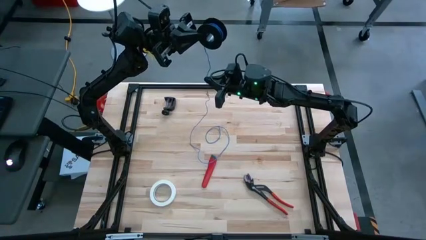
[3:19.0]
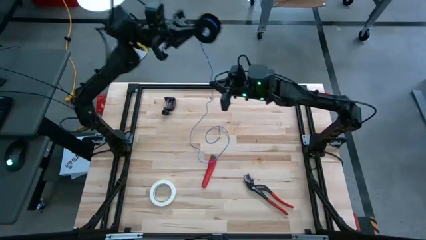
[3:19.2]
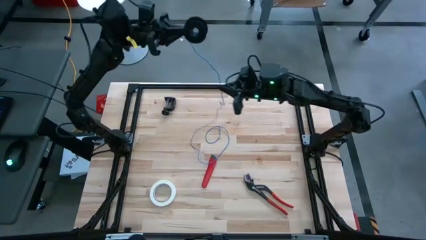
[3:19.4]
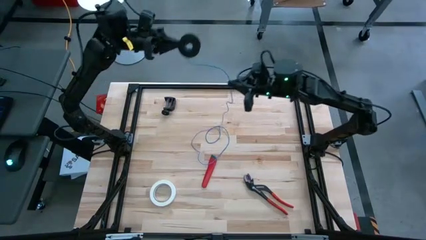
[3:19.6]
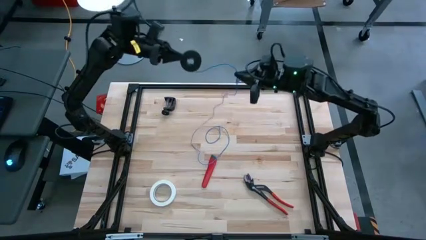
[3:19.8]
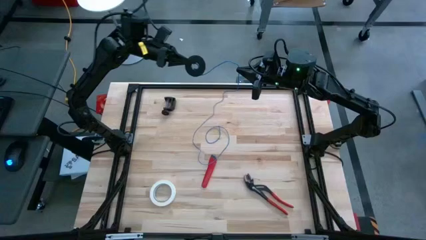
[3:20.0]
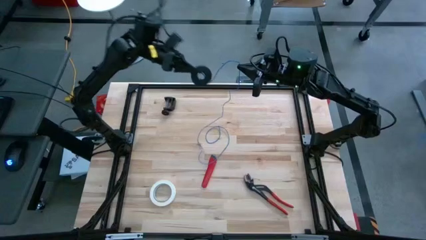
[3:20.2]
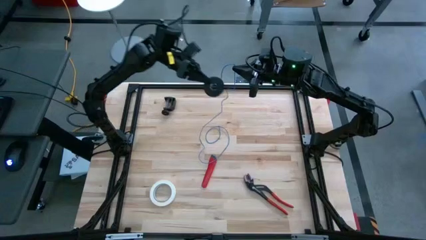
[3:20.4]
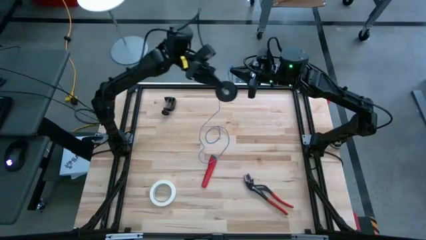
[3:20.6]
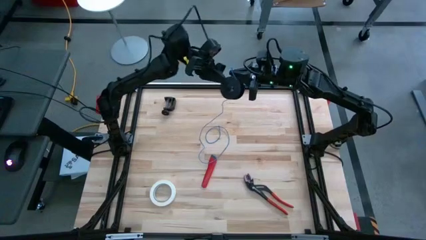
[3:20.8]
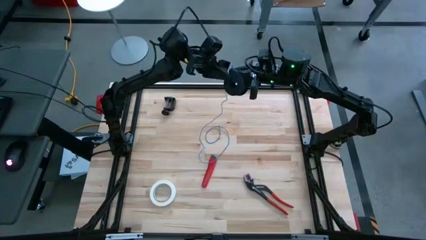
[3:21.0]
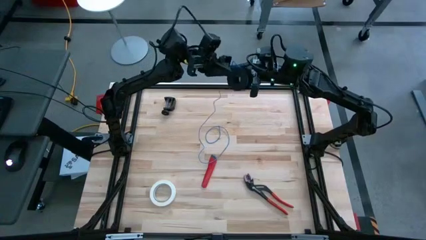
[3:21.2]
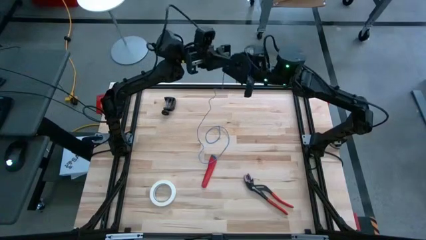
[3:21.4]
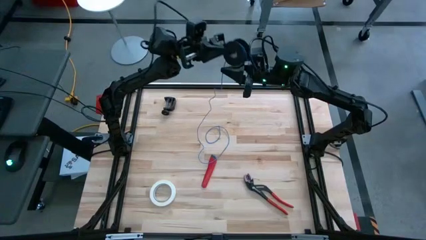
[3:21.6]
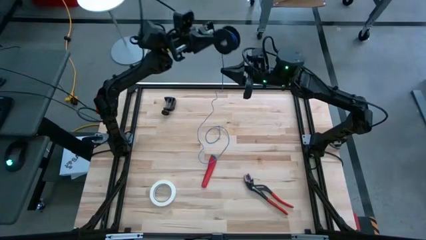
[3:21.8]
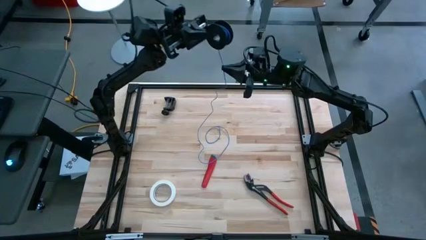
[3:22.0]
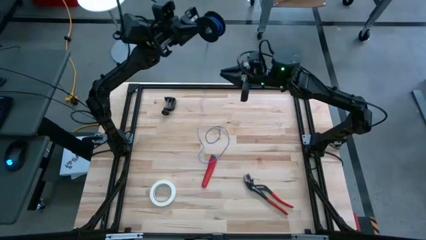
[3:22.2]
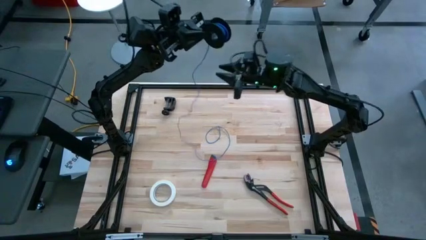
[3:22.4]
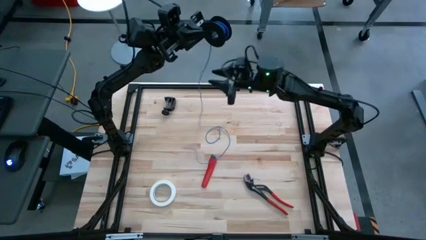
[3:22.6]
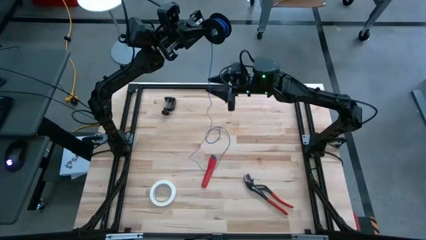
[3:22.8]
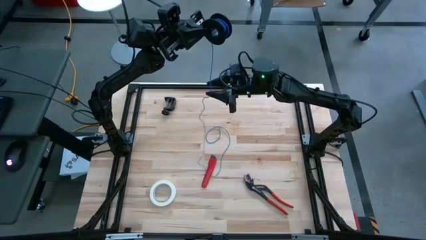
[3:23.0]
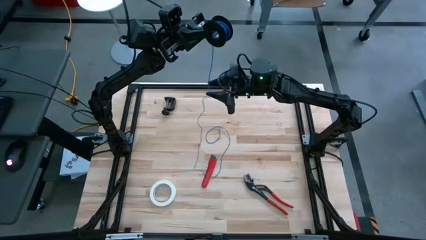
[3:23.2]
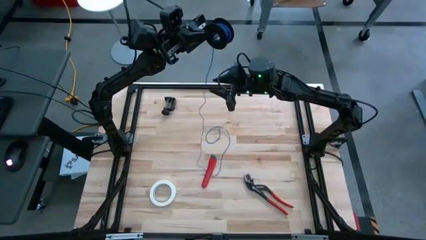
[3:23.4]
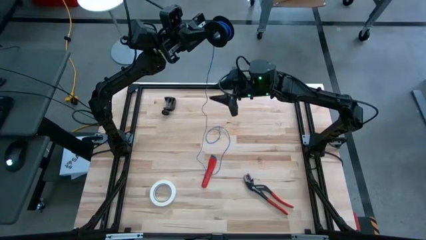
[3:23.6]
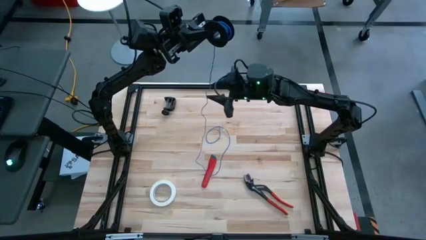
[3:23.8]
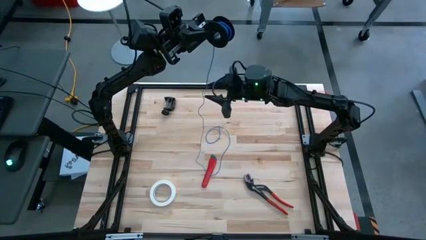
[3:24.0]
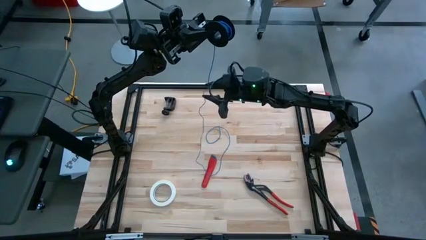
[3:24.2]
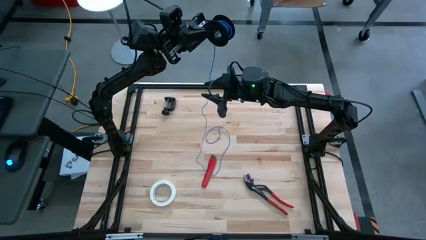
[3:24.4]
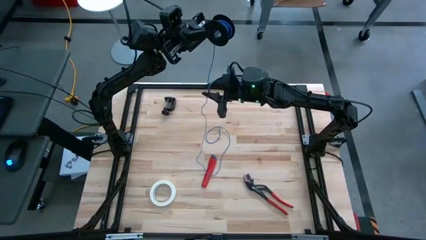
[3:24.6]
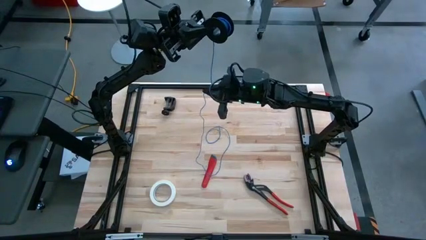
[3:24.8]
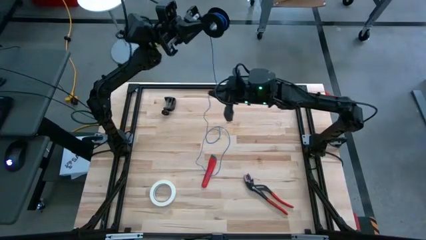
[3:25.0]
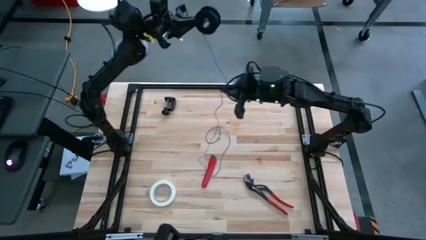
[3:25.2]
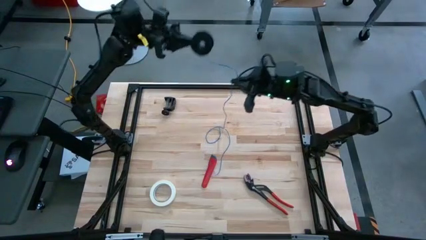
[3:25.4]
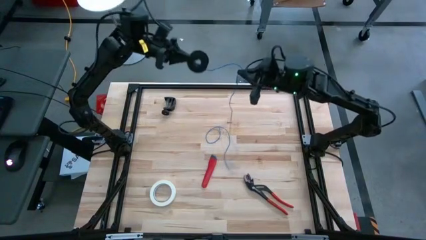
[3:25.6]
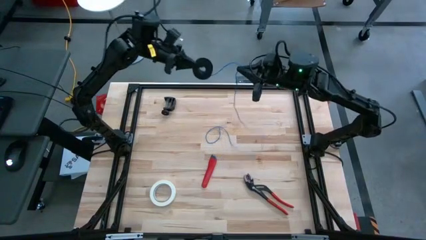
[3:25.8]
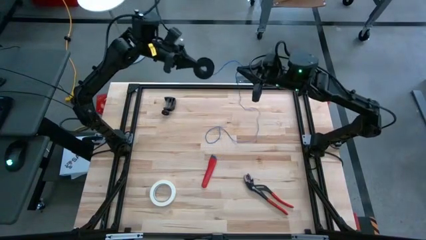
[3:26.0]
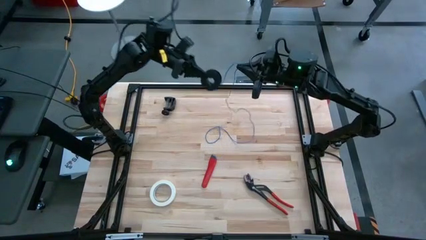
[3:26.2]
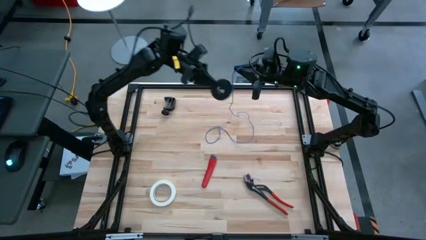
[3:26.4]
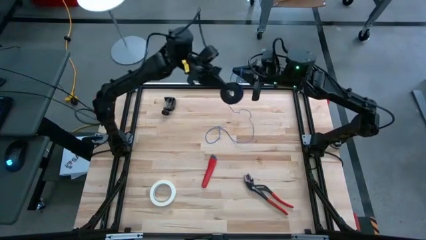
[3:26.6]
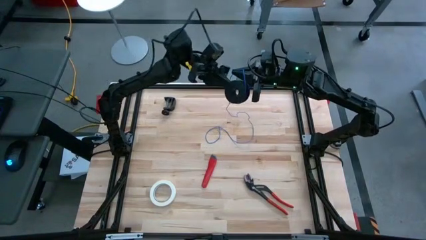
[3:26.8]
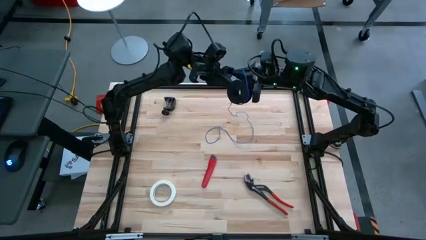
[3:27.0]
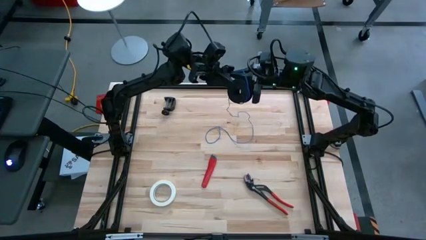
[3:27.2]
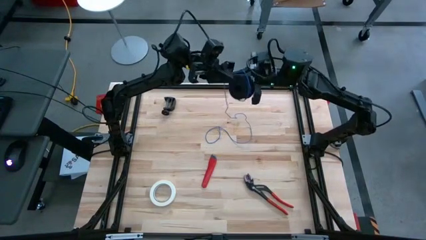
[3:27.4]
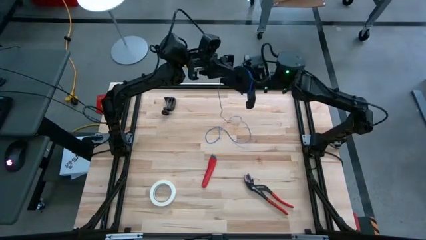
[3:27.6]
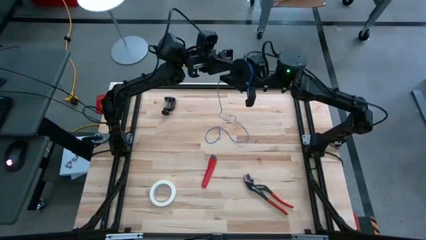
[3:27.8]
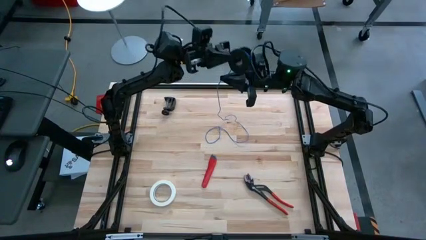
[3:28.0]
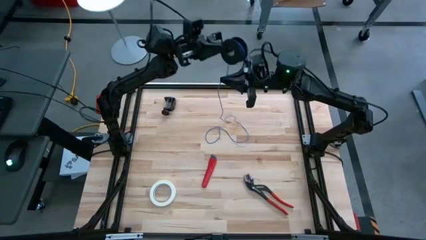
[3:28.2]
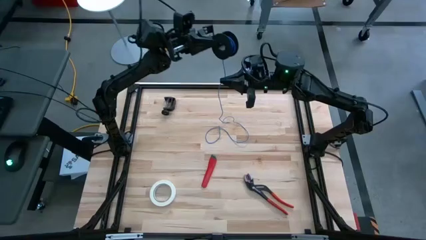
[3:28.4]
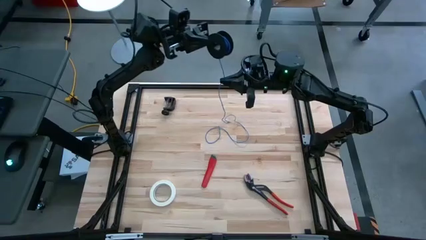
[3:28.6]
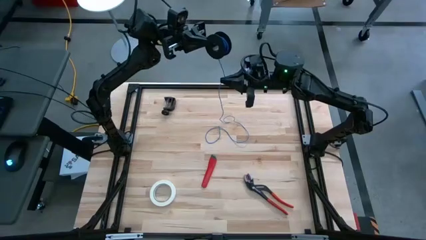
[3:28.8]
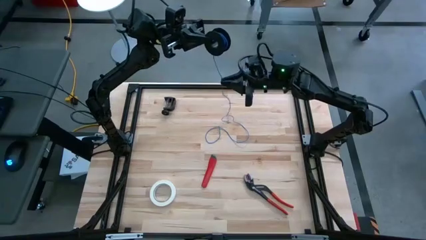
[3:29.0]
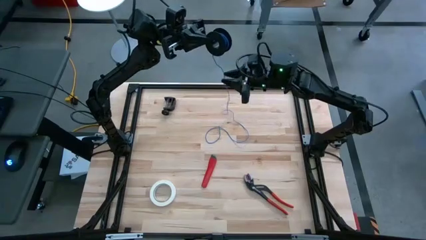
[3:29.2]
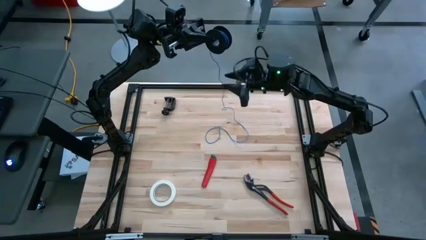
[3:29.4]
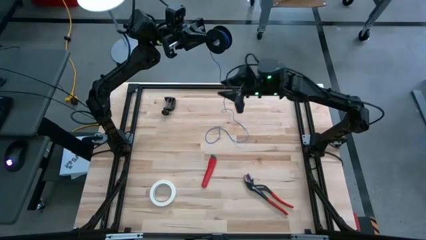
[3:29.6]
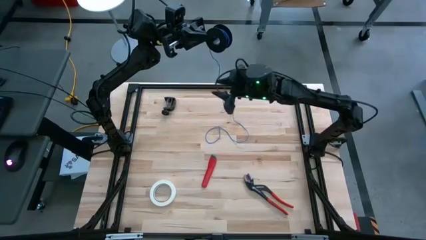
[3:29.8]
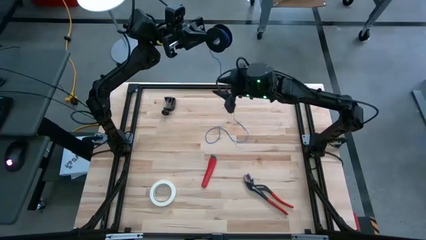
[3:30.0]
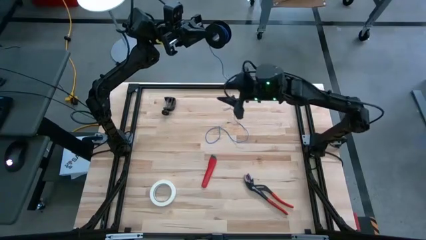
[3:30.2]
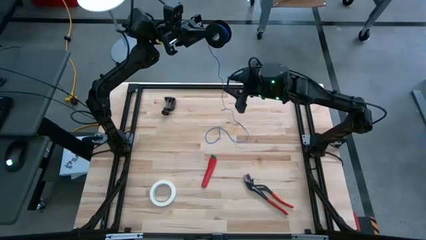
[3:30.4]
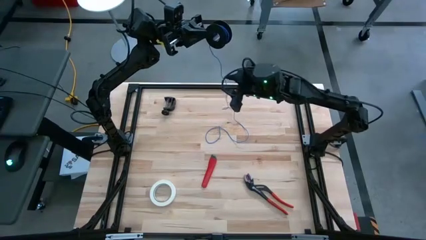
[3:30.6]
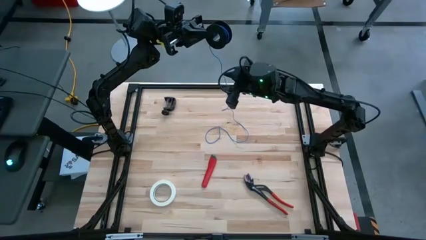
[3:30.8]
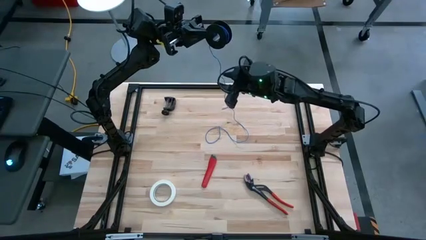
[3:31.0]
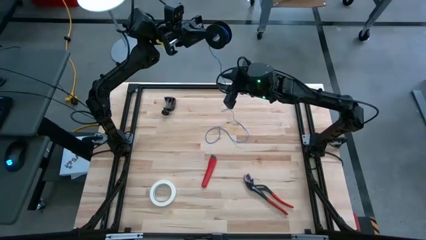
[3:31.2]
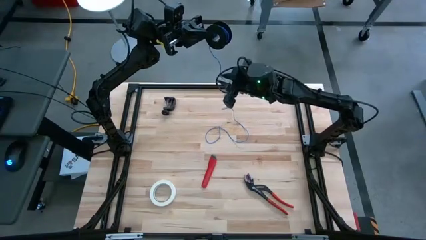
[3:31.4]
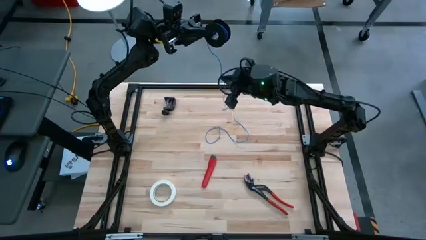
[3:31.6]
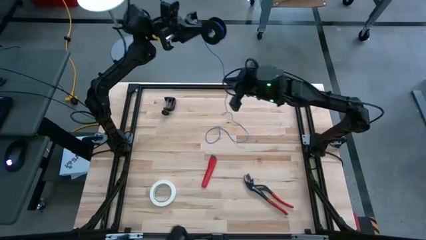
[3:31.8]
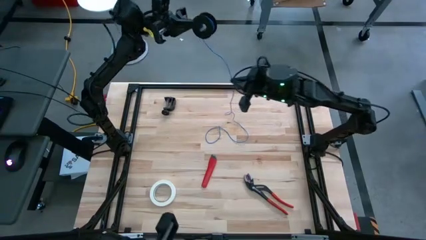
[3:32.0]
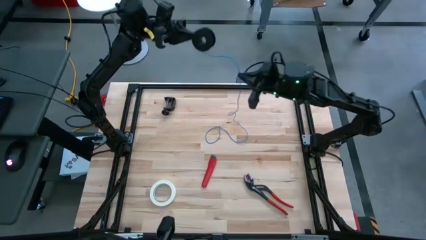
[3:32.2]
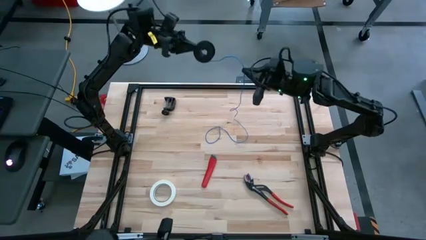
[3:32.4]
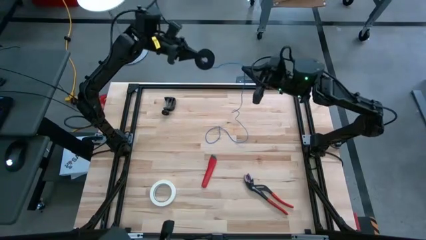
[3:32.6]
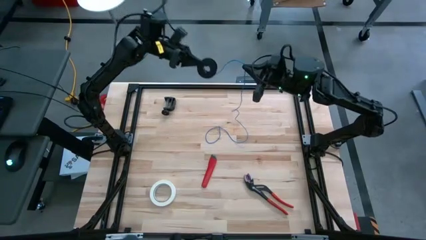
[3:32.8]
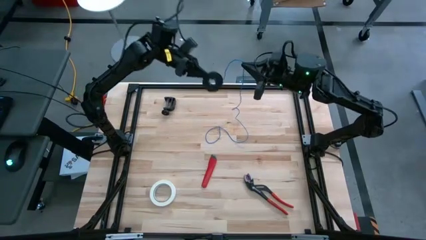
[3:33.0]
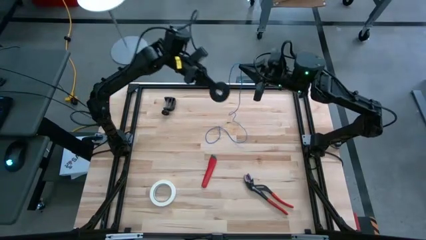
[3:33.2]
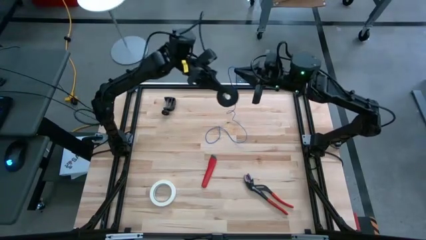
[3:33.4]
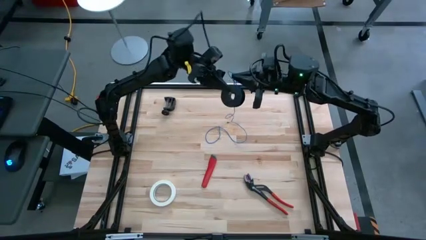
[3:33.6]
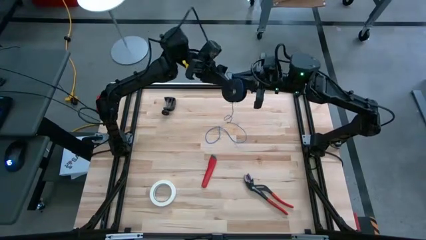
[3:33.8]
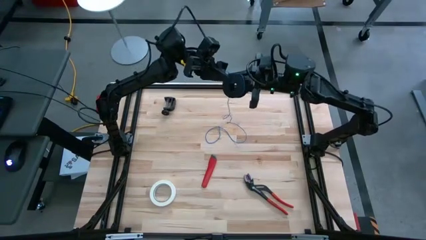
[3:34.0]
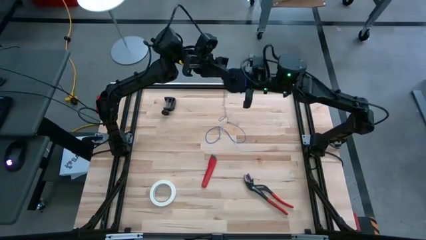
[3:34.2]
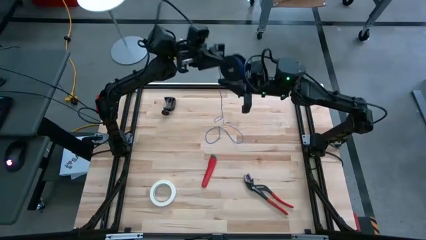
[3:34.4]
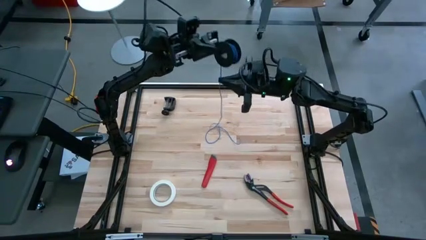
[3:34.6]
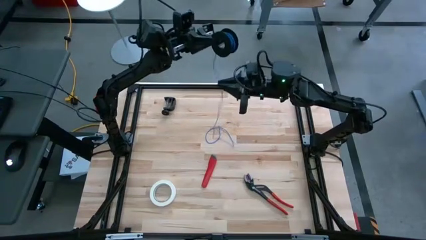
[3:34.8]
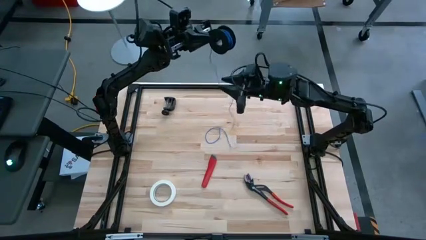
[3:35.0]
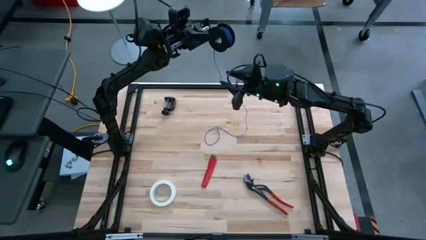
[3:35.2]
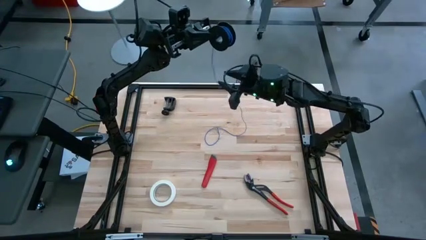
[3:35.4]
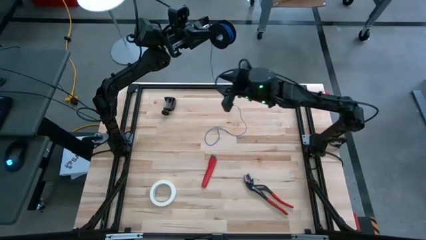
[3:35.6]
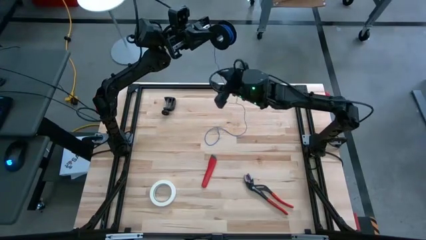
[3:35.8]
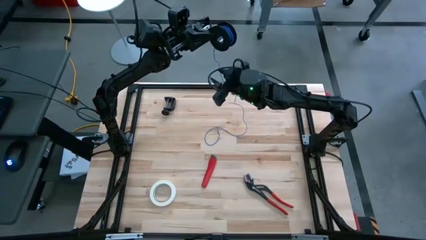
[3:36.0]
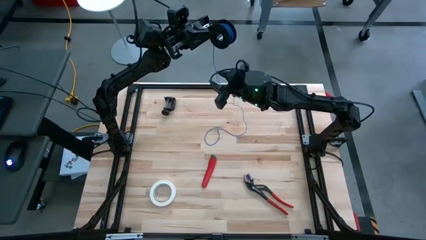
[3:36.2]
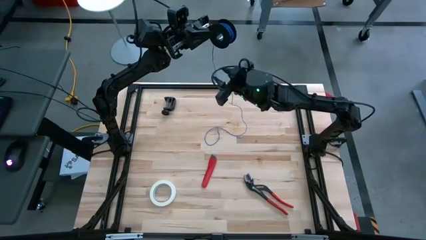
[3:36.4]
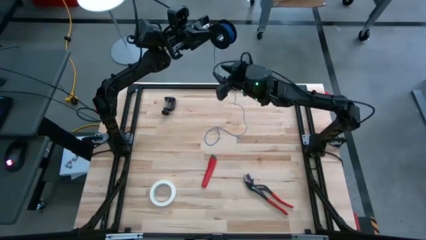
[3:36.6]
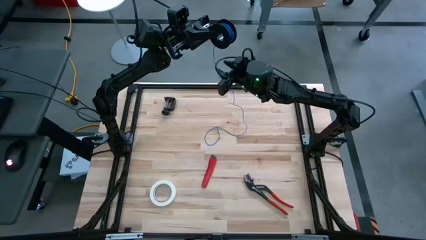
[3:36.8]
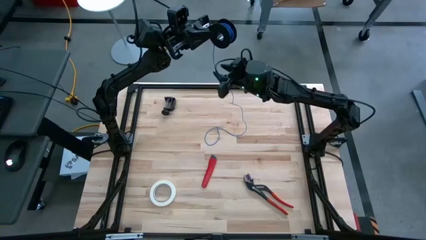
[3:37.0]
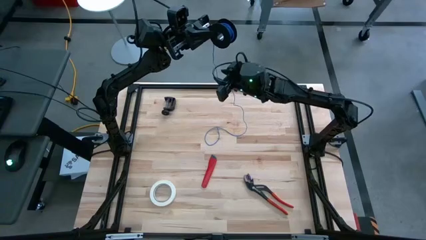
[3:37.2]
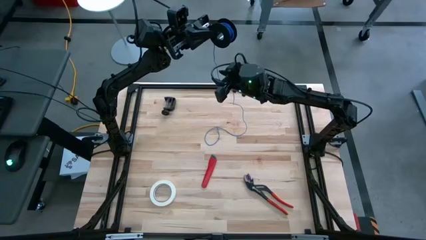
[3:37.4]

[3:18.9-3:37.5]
Task: Coil cords
Coil the blue wire cable onto the black spool
